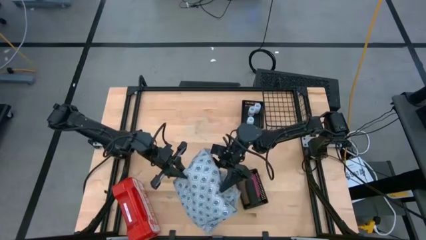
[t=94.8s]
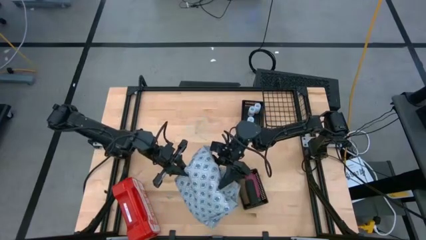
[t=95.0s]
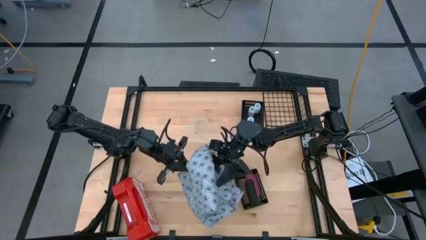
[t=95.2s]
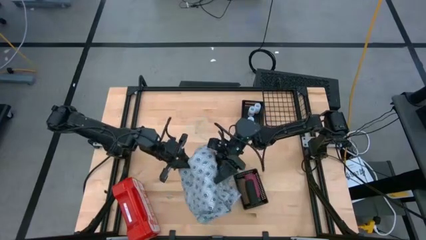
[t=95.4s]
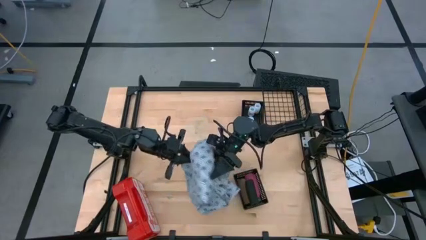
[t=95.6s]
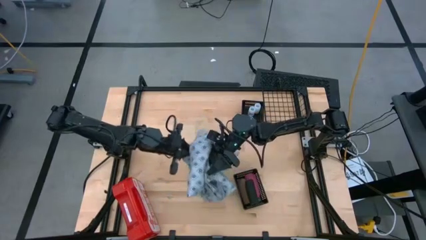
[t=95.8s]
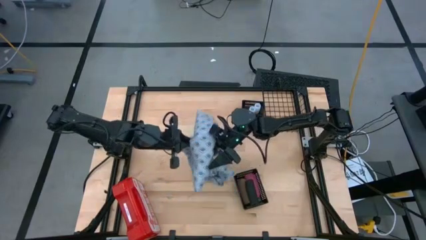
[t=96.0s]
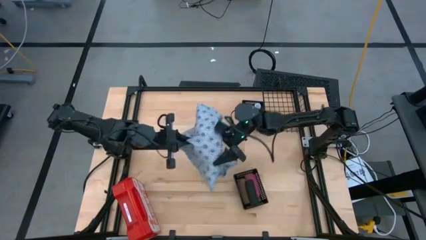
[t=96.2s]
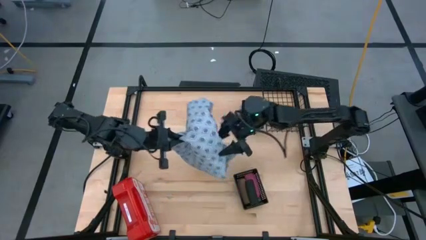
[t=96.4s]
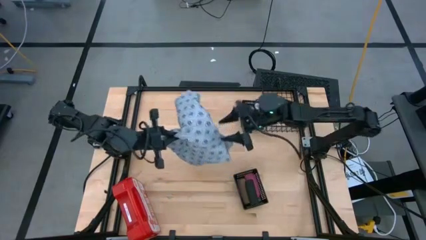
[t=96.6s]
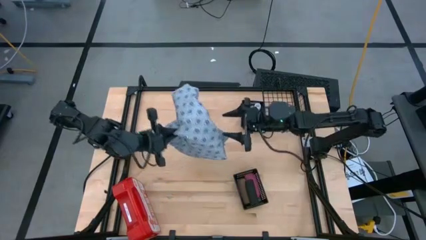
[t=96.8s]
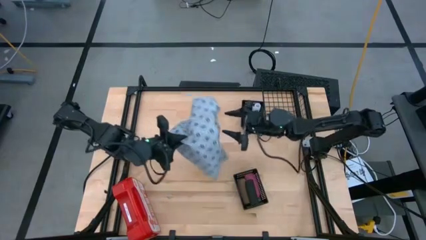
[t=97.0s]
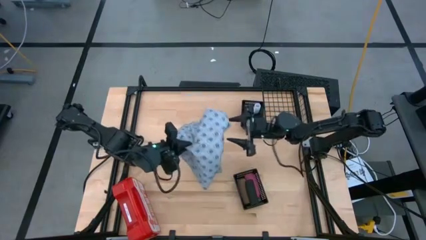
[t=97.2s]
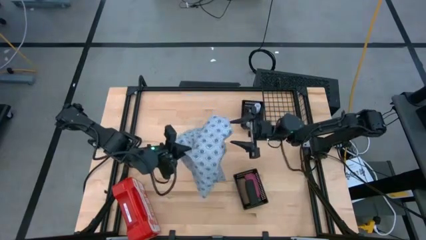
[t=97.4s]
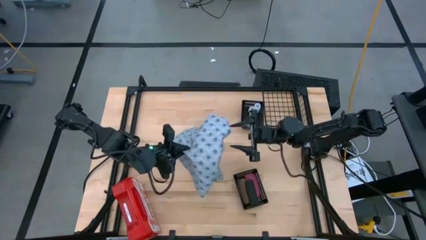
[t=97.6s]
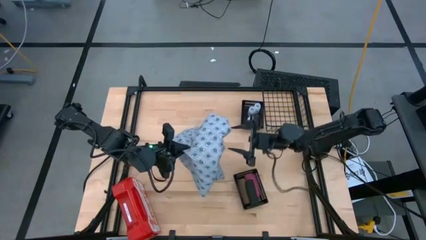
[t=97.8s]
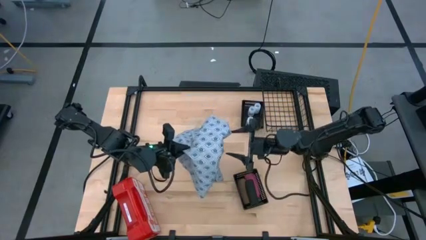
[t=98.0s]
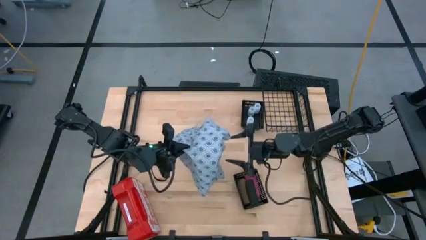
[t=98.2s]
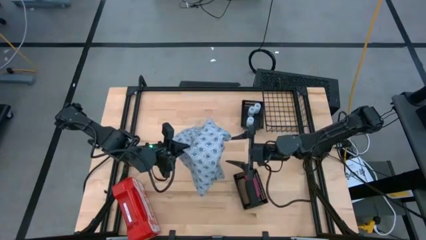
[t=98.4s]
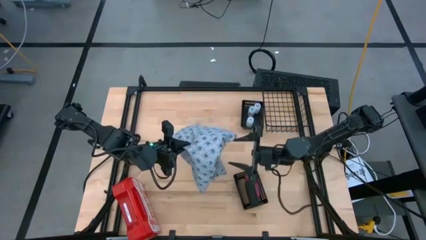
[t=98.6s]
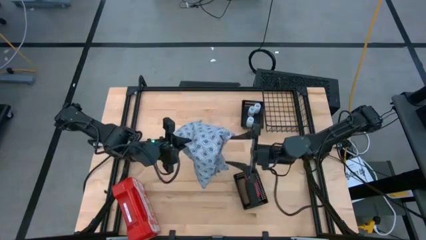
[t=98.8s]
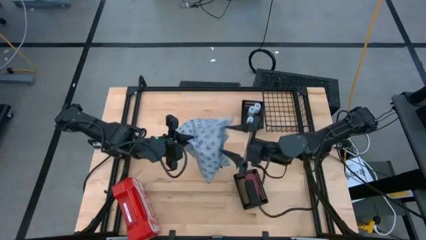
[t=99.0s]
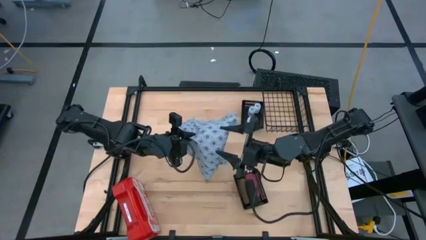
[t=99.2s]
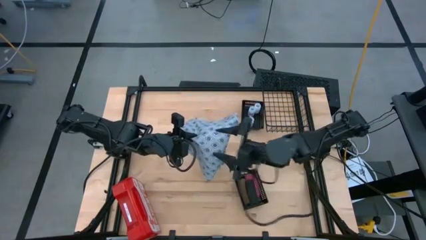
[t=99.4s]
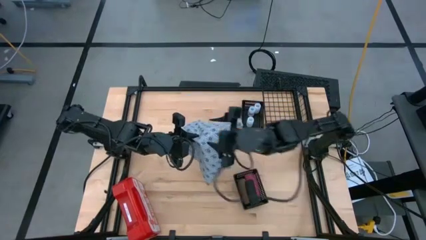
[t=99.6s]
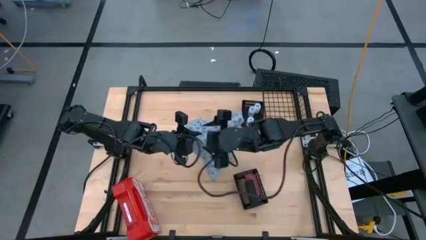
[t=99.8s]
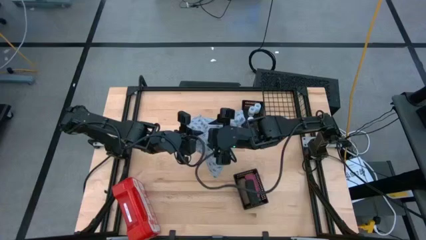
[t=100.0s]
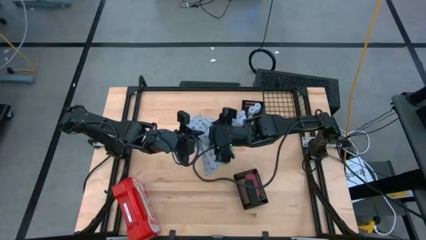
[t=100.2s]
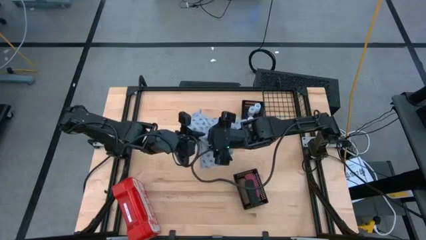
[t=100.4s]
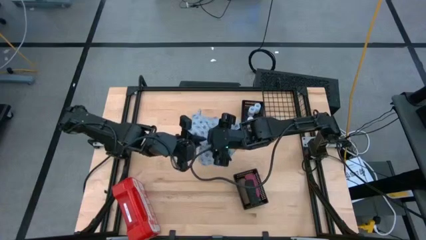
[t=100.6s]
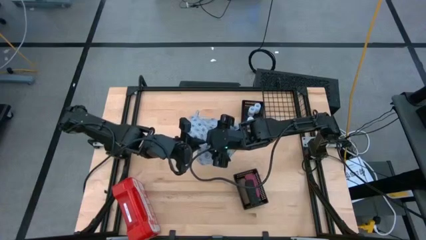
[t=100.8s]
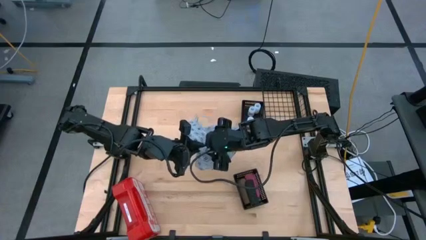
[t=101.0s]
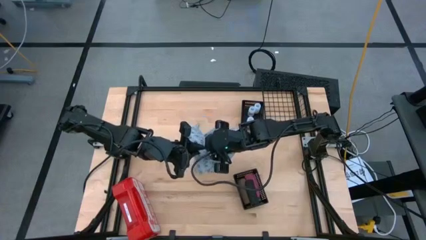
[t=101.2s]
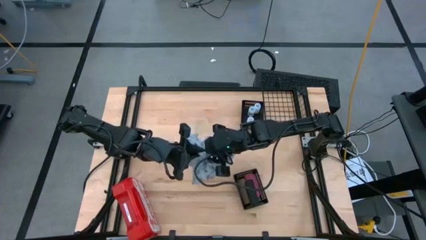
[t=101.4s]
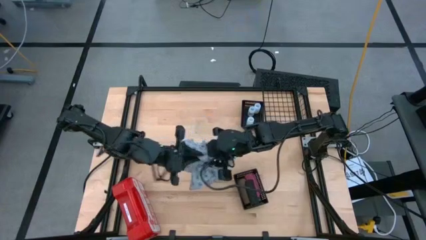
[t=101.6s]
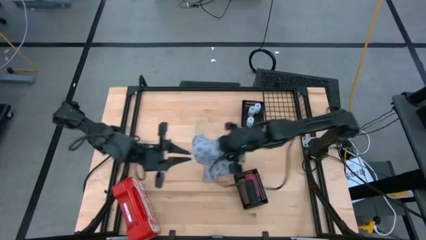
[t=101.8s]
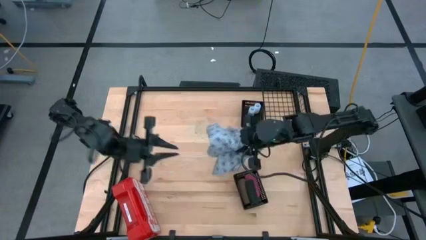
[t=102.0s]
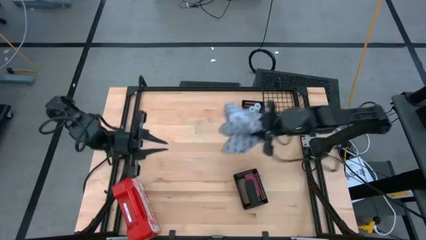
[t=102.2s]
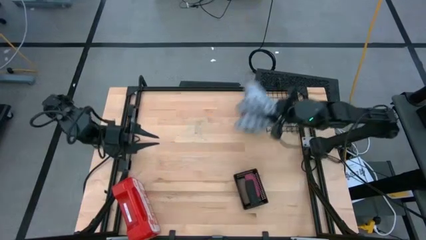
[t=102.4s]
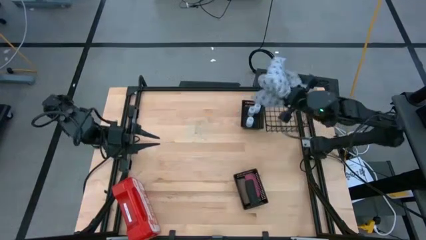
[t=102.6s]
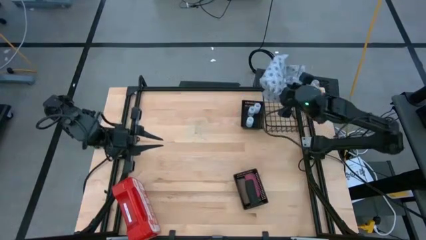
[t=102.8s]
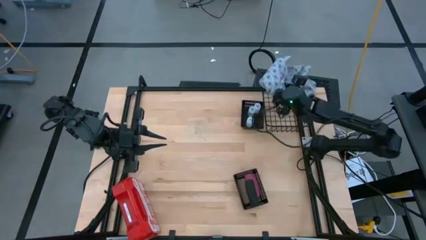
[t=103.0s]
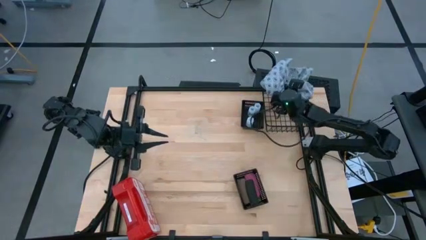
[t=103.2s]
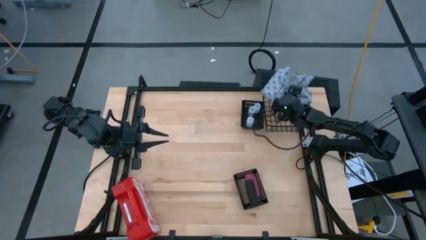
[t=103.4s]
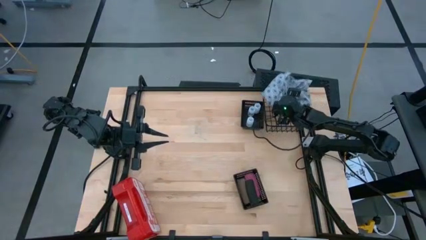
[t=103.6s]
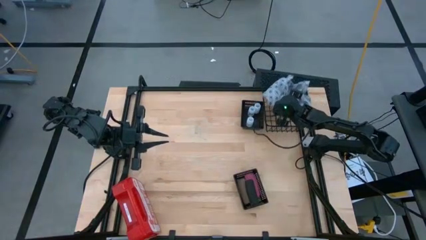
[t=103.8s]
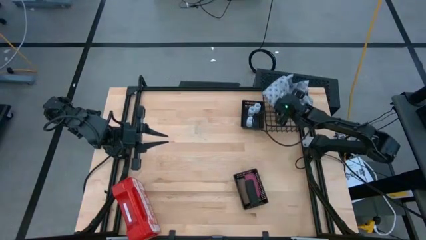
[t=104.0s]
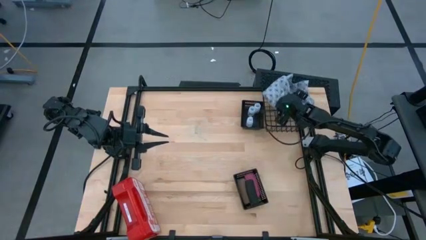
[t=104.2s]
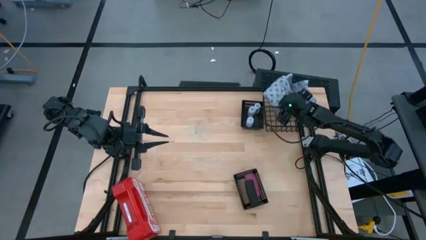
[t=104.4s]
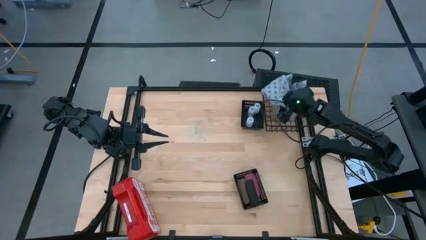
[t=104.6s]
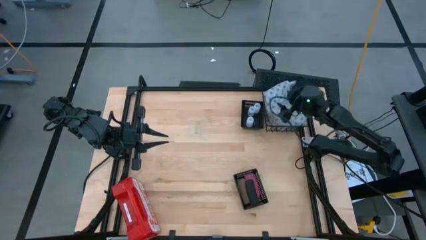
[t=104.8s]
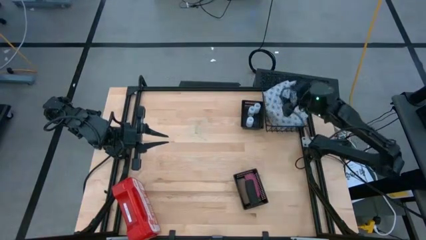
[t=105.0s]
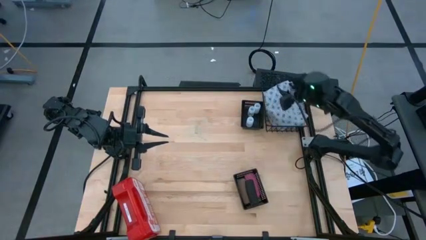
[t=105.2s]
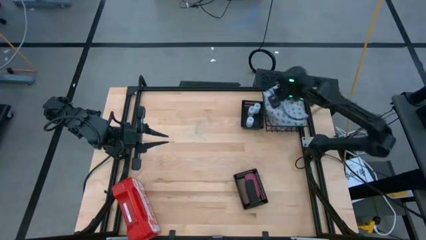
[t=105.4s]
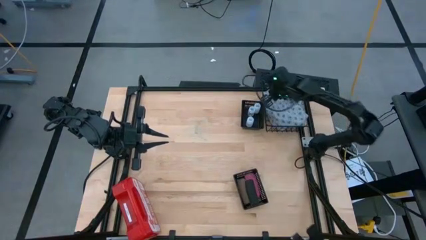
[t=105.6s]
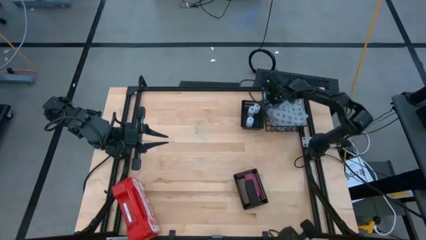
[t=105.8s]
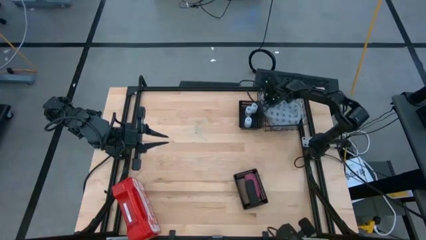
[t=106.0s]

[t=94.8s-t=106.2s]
Task: Pick & Place Medicine items
Put the gray patient gown into the black wire basket

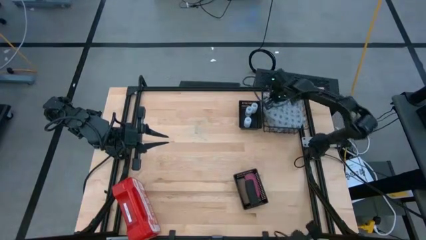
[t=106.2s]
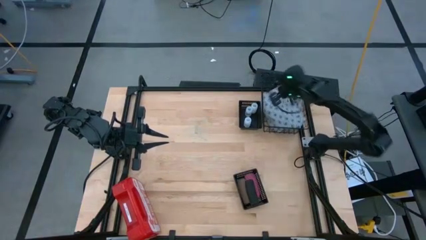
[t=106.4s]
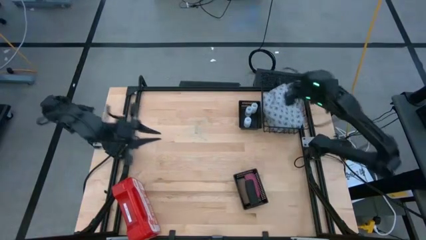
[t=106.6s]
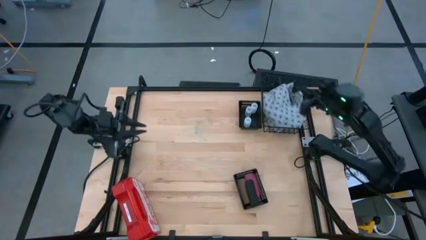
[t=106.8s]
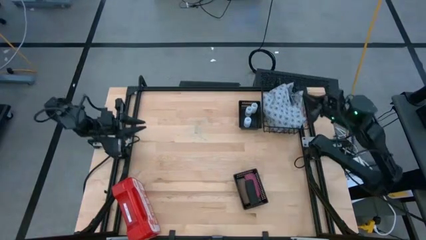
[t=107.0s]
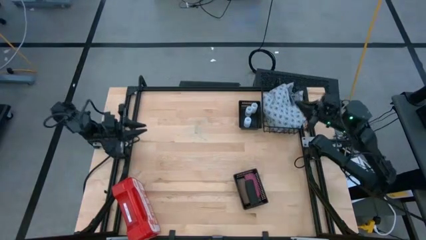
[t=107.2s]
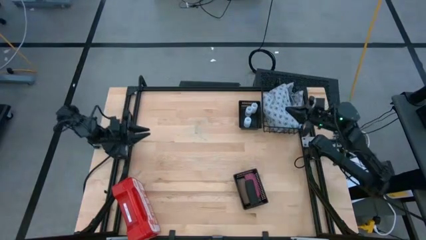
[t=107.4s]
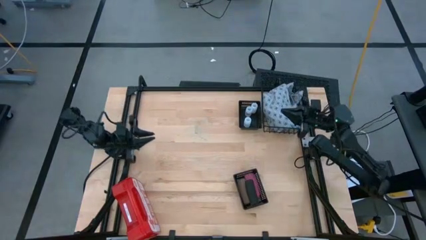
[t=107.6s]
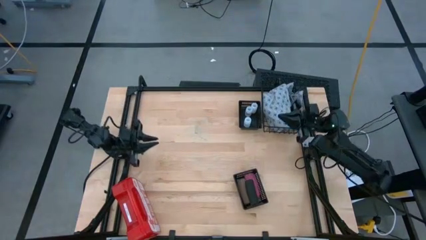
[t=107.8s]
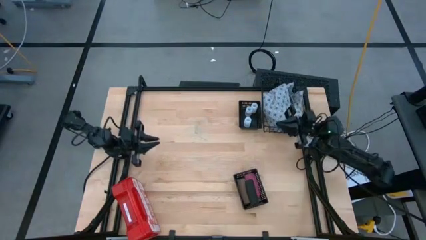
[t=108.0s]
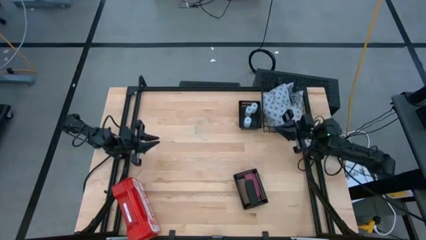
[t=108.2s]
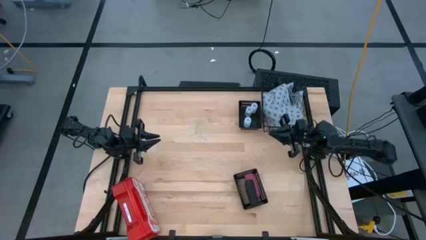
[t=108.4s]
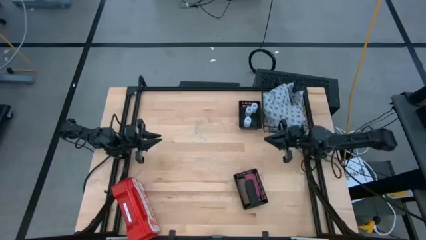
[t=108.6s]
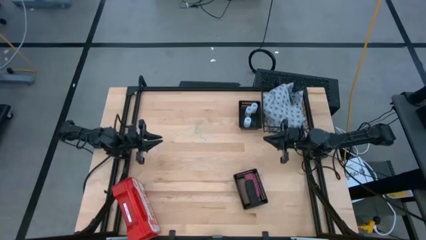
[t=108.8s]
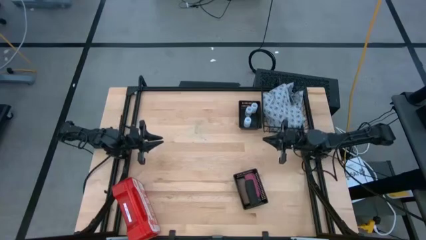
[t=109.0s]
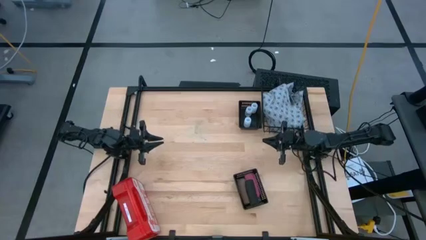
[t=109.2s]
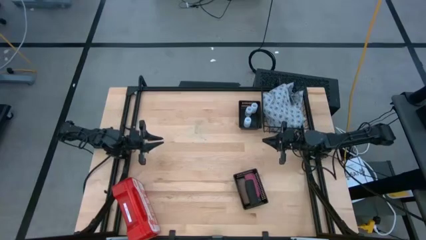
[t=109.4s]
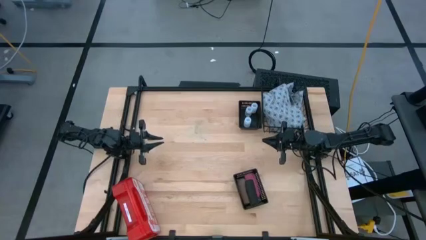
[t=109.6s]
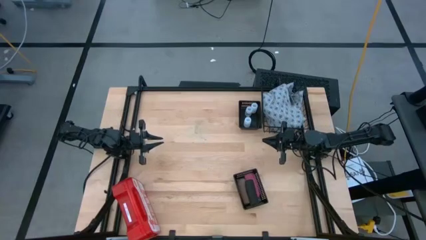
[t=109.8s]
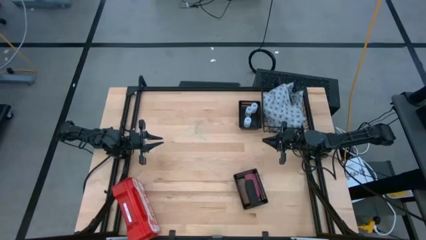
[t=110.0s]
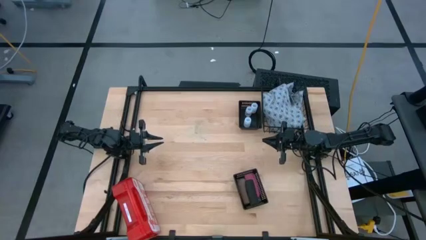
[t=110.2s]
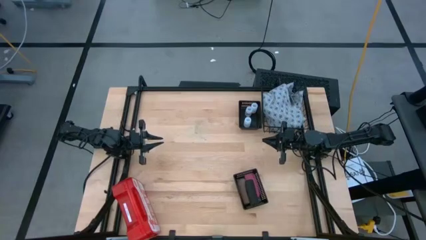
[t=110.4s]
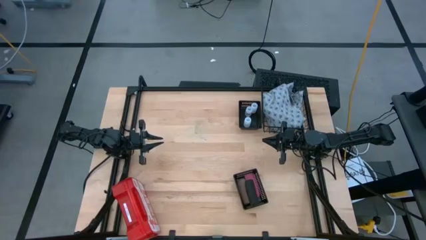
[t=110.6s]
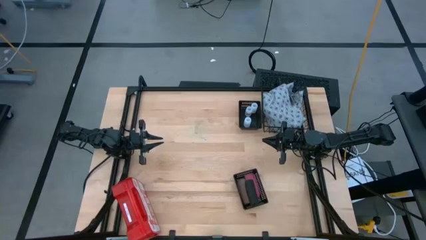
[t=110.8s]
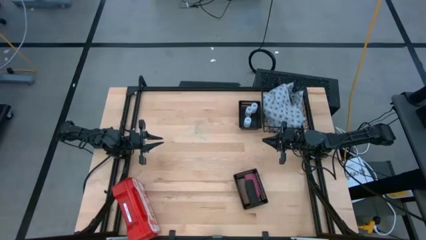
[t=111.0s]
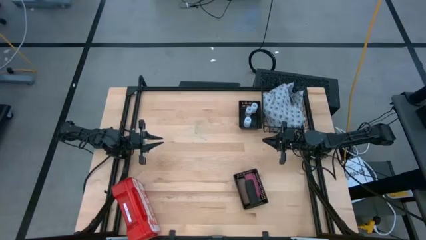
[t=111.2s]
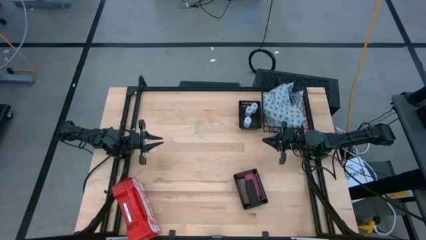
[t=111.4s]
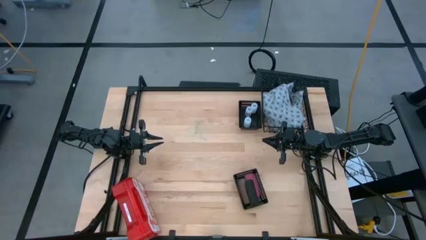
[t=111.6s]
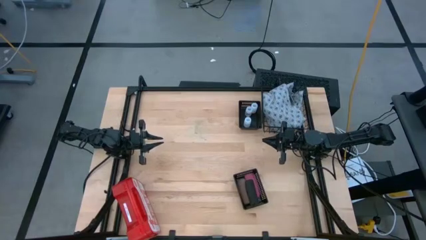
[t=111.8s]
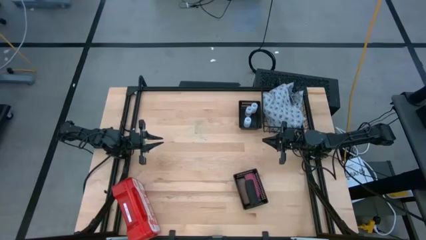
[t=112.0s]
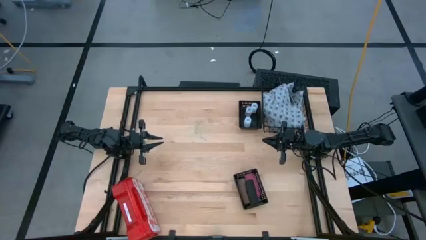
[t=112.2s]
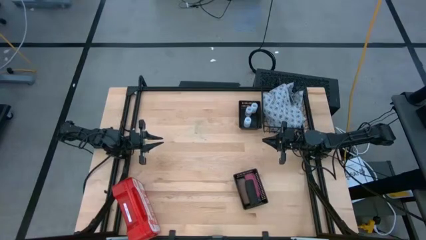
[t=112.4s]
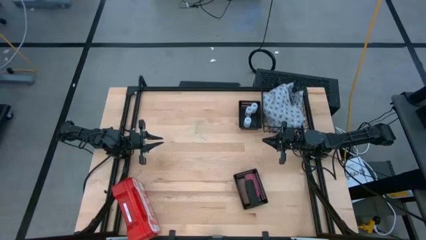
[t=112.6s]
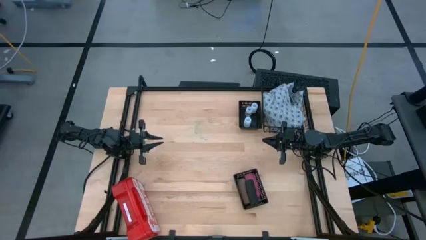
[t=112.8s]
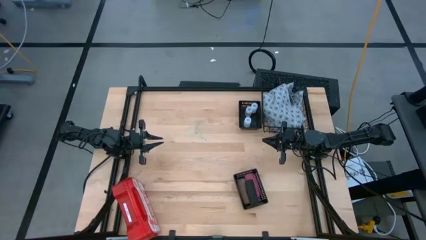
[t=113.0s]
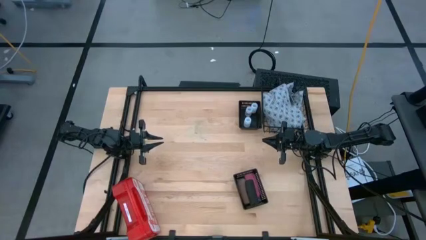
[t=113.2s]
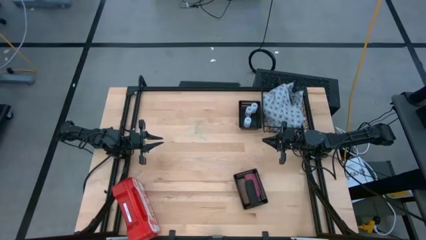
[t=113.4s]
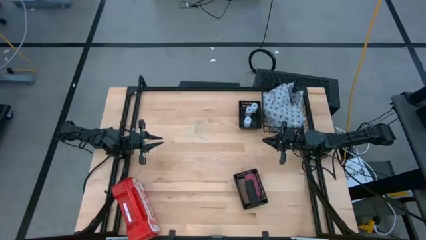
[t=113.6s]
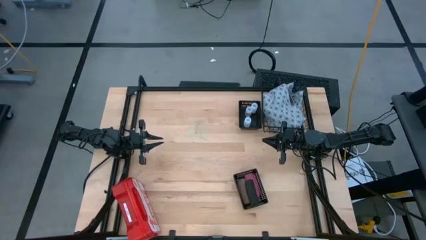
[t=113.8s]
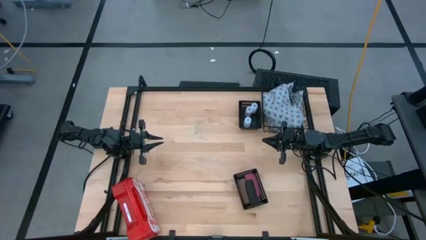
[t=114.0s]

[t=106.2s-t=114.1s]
Return to Home Position
